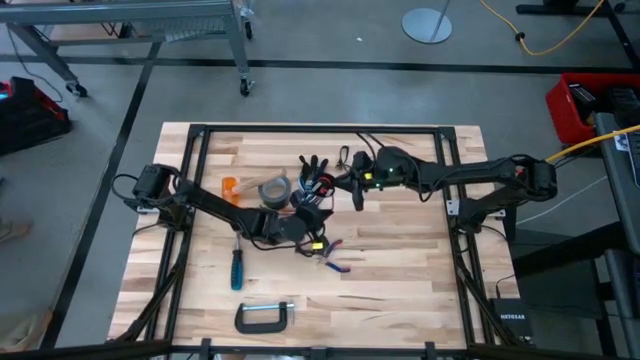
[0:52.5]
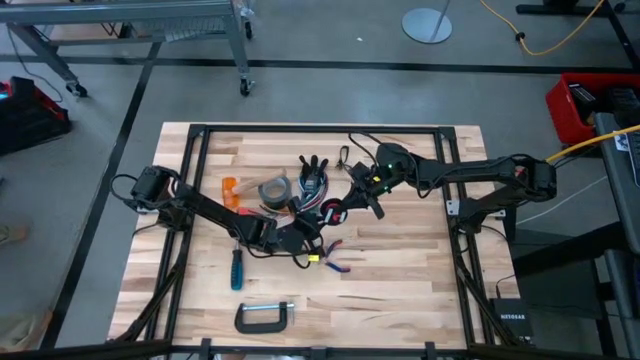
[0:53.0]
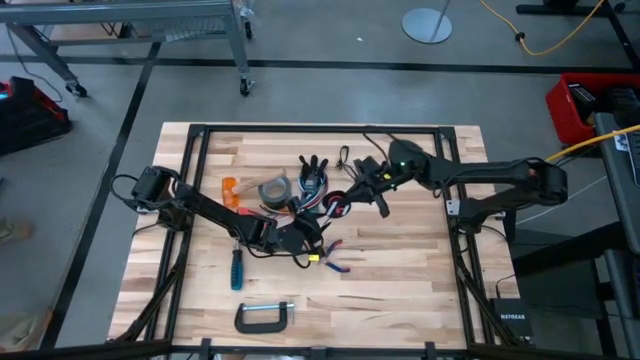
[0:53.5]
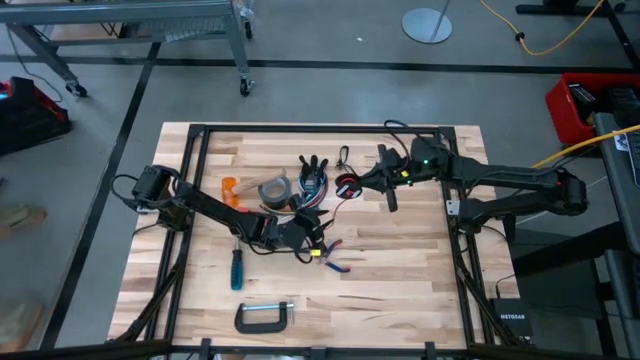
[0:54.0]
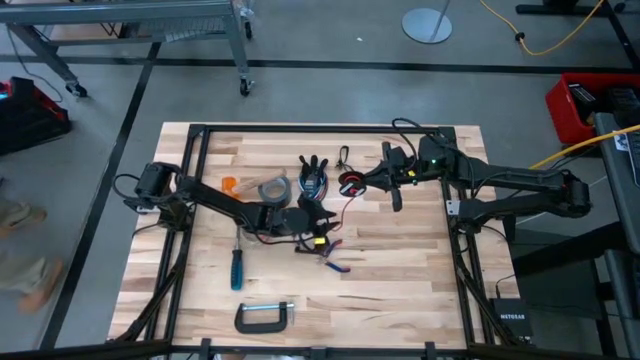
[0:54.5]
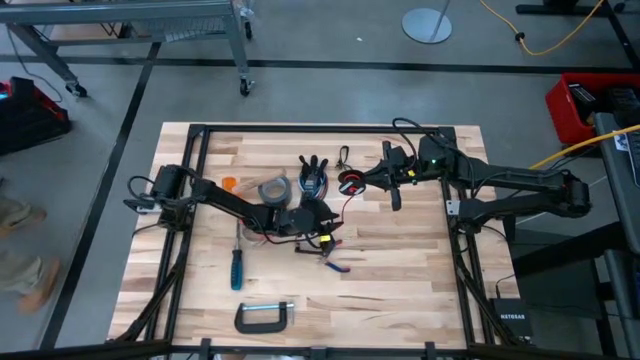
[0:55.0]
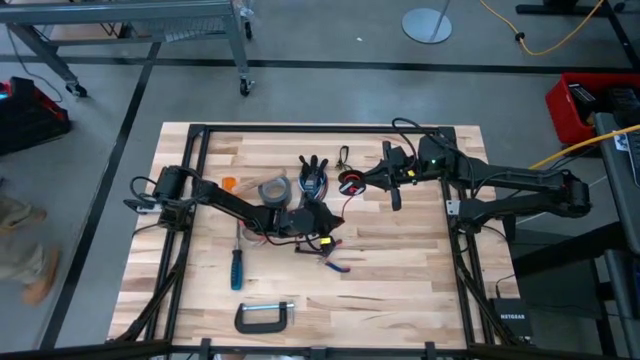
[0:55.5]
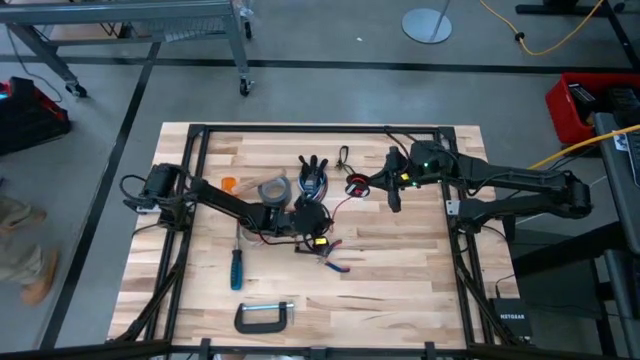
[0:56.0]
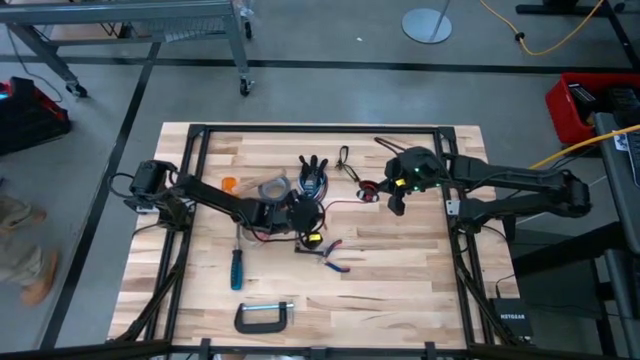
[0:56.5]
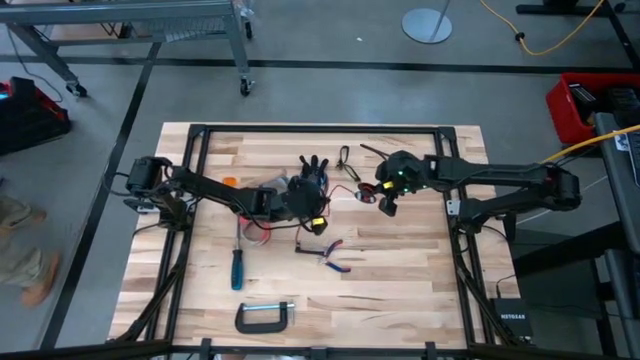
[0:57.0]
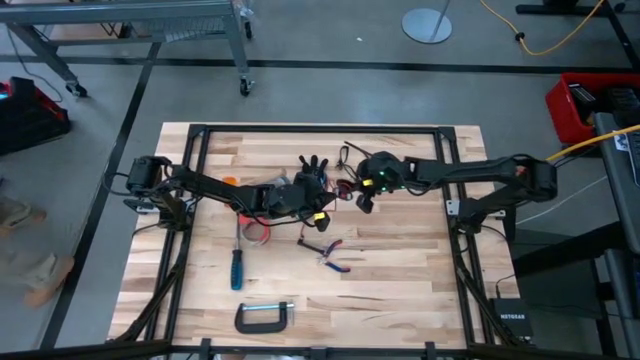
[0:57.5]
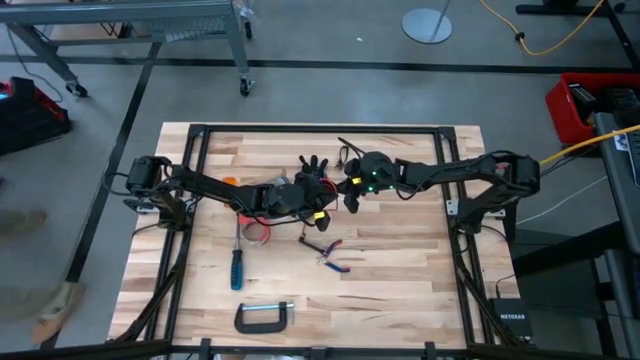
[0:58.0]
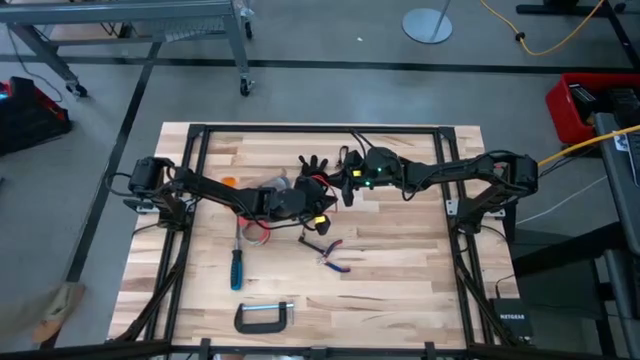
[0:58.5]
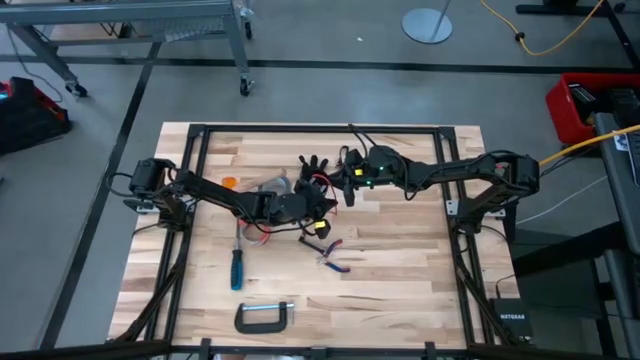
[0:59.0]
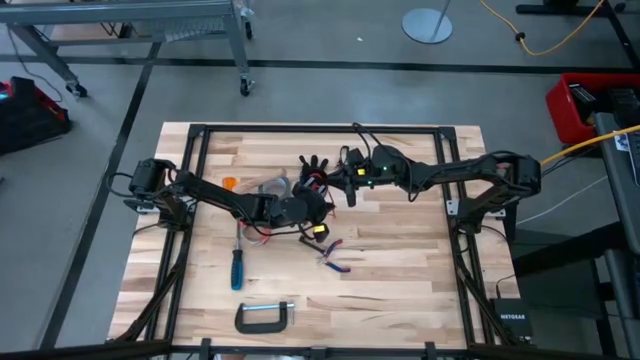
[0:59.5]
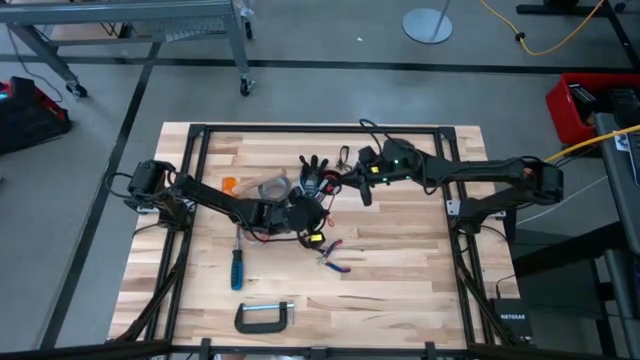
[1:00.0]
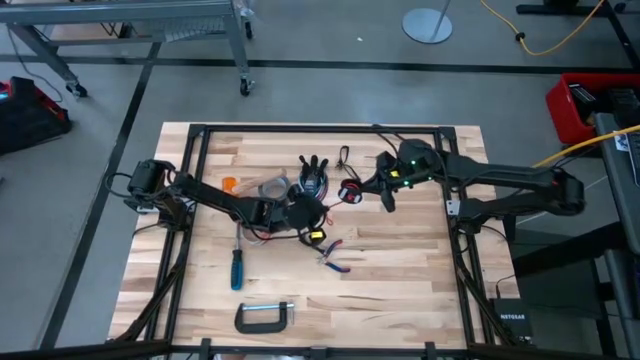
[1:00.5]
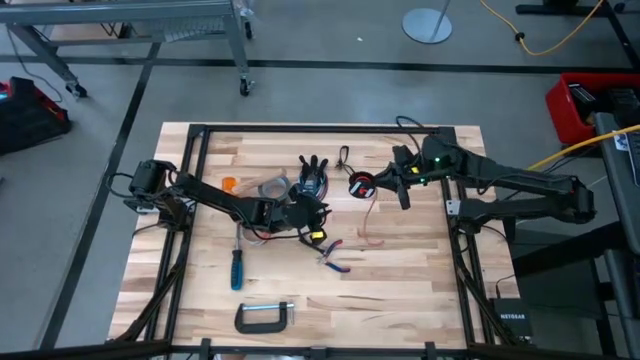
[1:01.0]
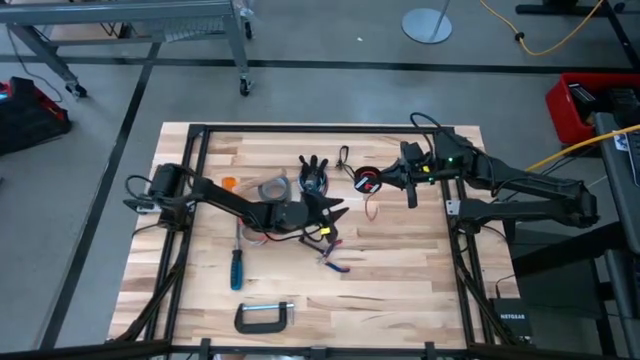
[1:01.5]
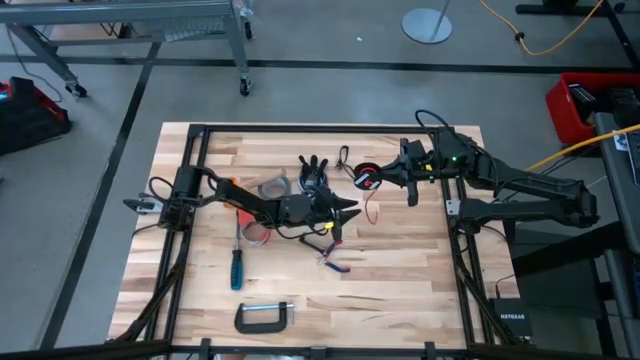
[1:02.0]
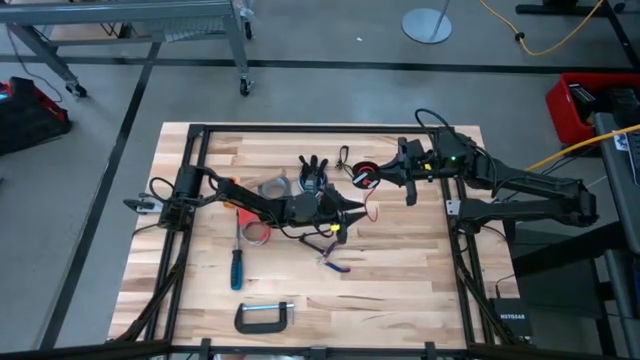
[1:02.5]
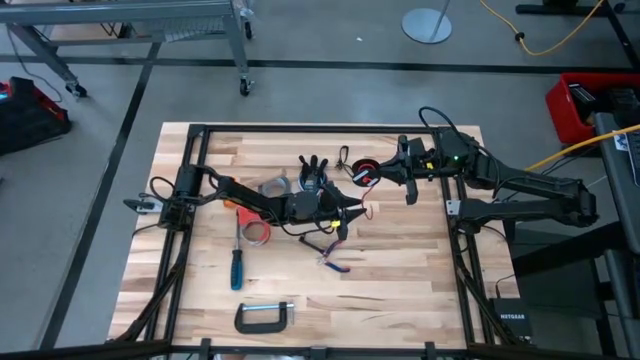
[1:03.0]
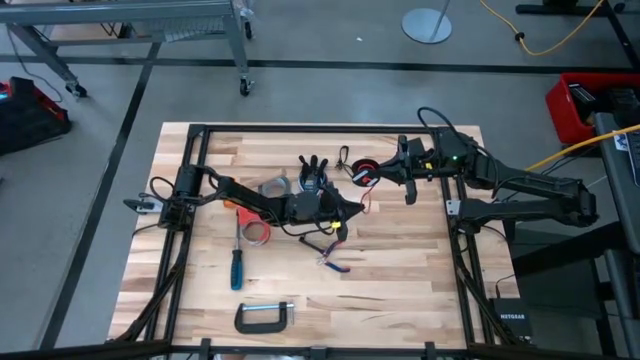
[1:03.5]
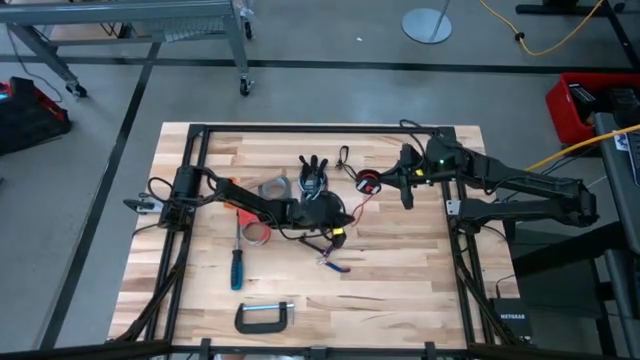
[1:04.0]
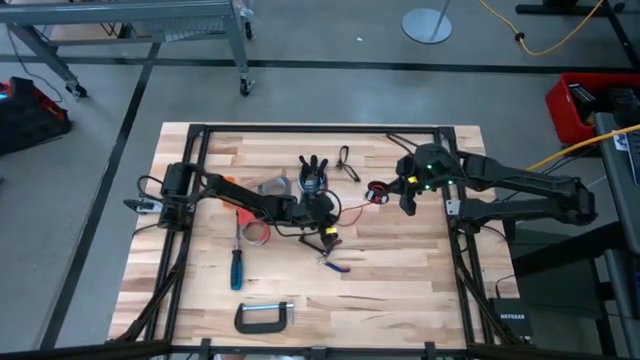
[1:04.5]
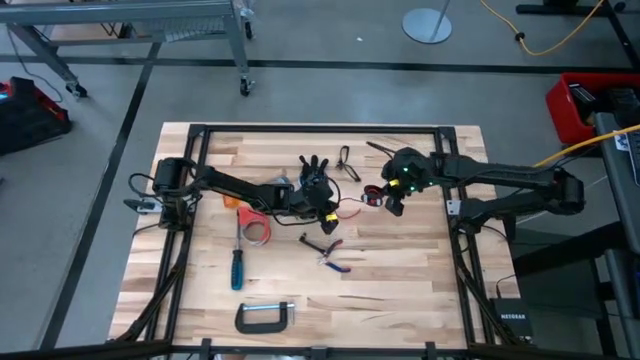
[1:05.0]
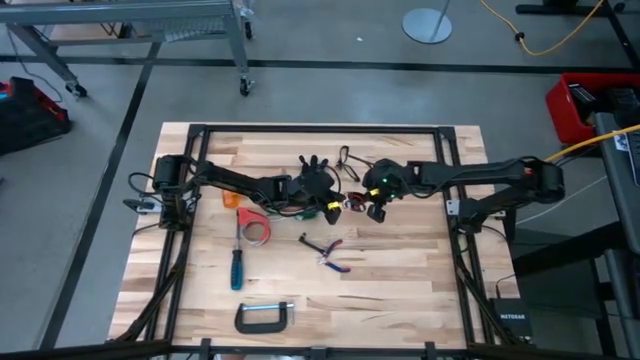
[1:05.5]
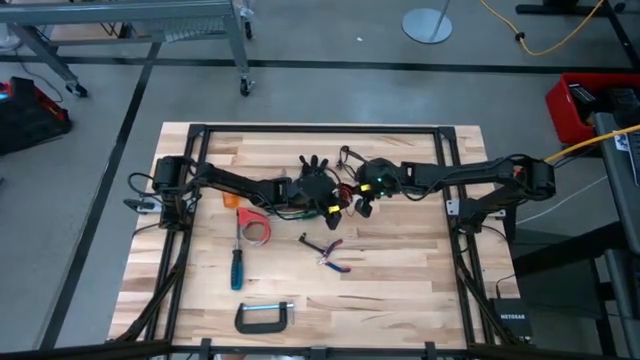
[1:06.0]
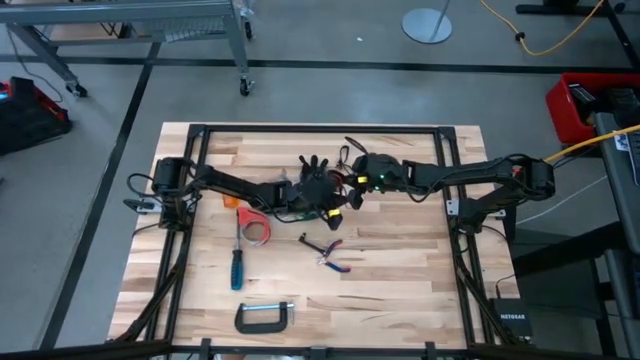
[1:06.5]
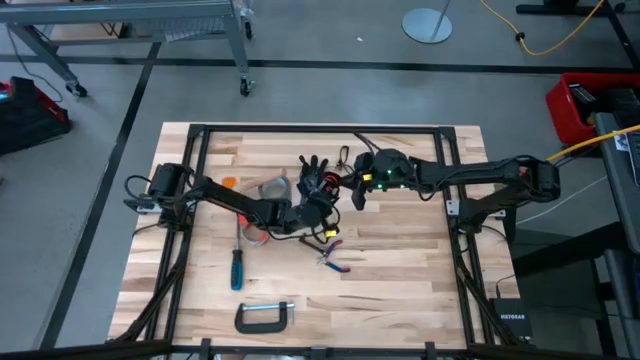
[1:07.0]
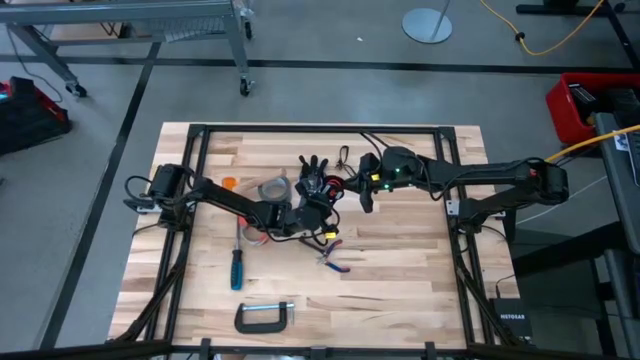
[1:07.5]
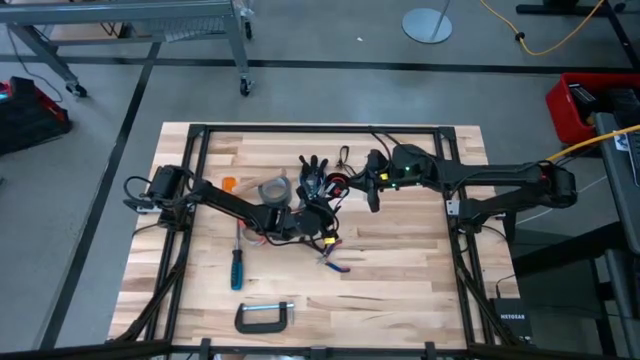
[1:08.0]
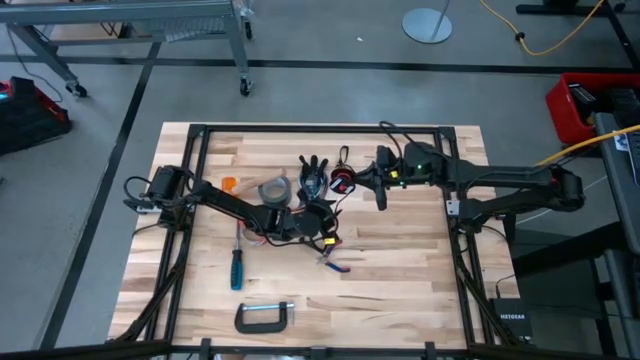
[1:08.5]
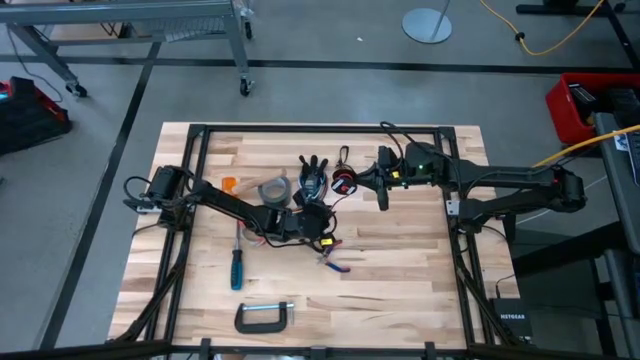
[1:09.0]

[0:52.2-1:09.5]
Task: Coil cords
Coil the red wire onto the black spool
